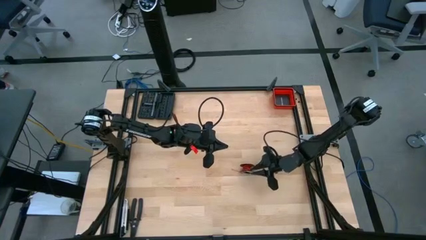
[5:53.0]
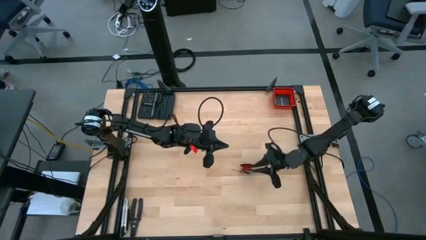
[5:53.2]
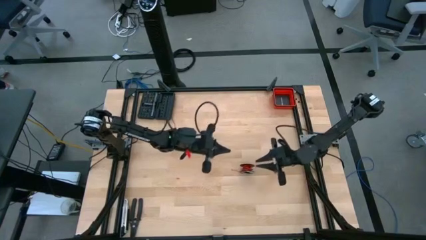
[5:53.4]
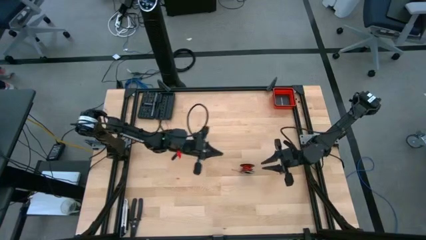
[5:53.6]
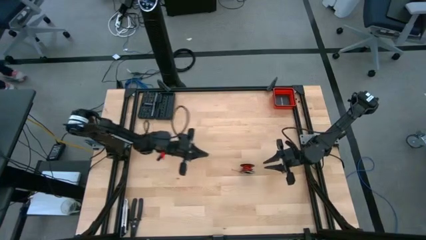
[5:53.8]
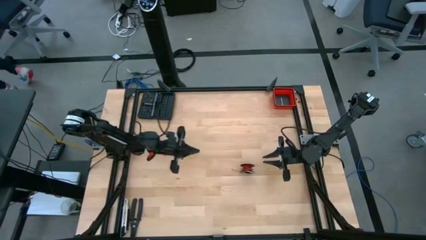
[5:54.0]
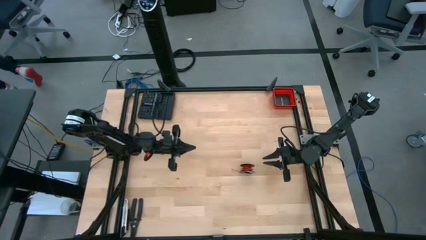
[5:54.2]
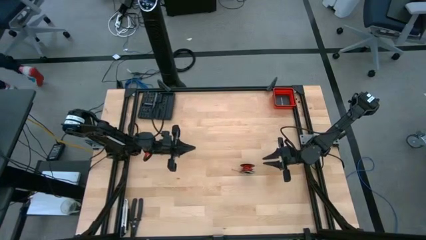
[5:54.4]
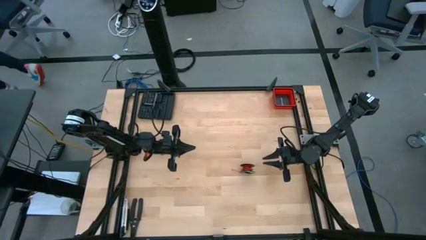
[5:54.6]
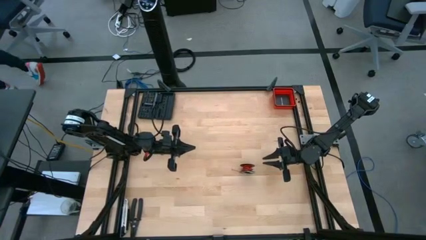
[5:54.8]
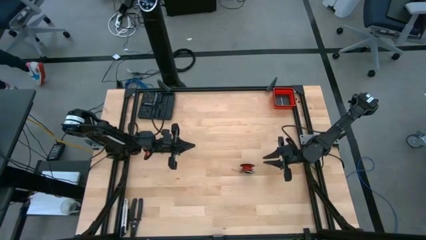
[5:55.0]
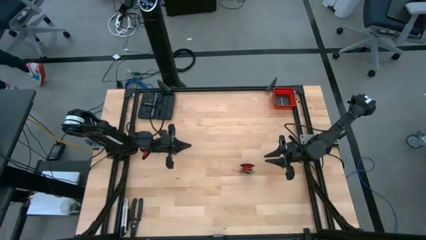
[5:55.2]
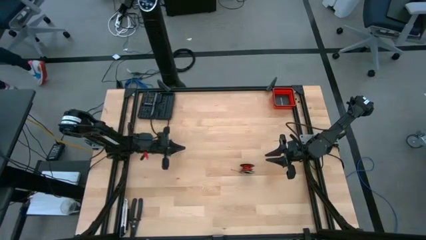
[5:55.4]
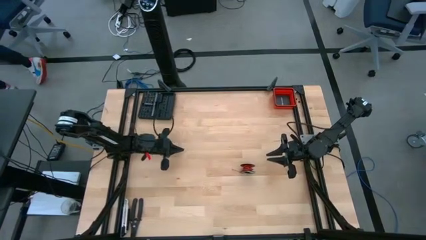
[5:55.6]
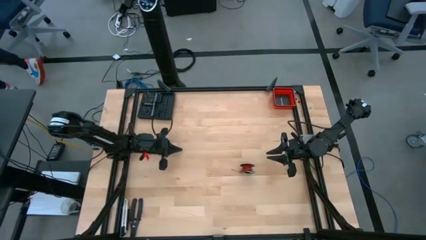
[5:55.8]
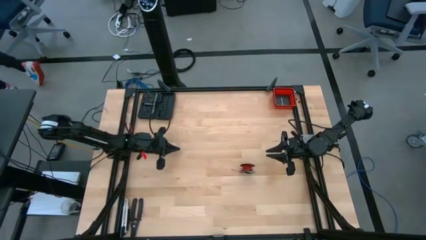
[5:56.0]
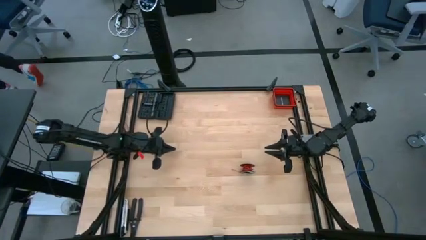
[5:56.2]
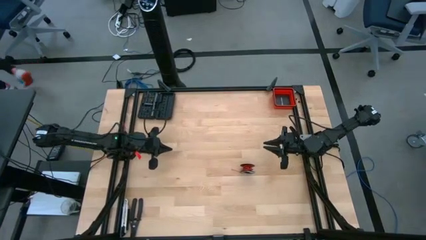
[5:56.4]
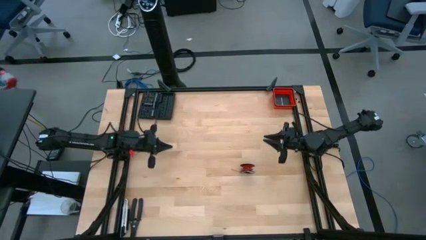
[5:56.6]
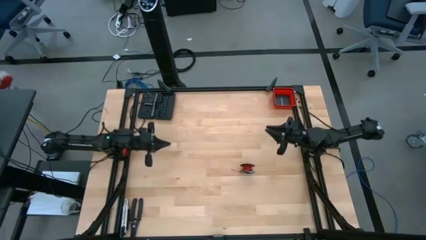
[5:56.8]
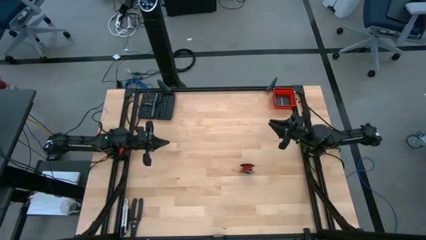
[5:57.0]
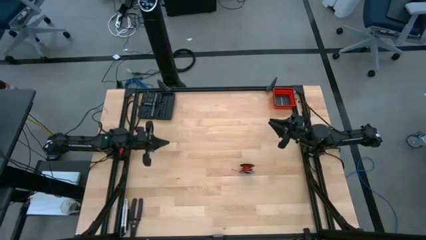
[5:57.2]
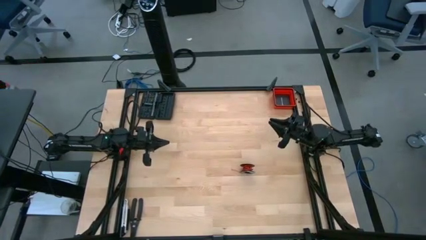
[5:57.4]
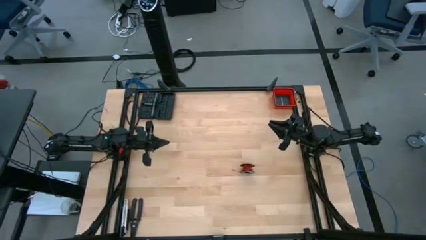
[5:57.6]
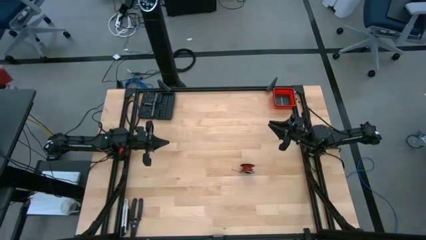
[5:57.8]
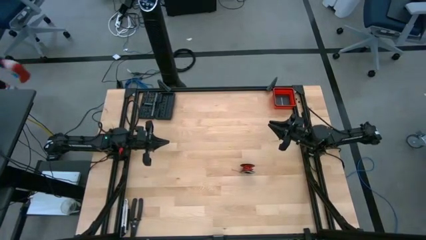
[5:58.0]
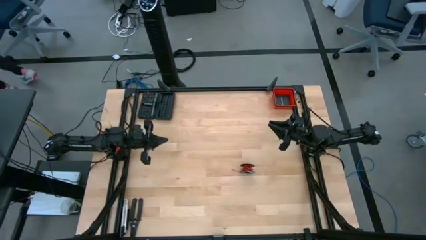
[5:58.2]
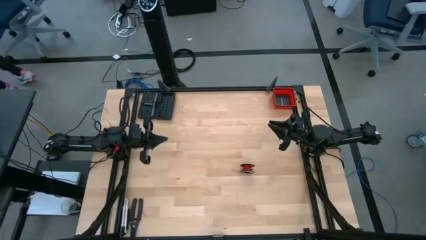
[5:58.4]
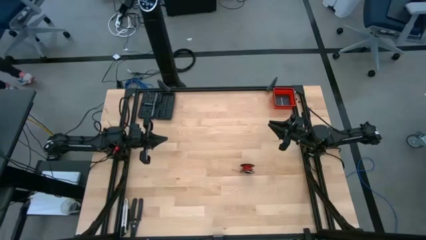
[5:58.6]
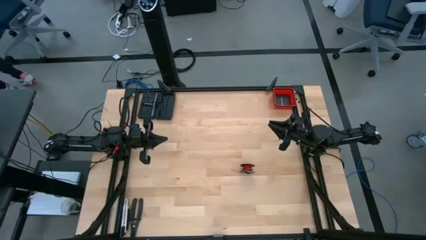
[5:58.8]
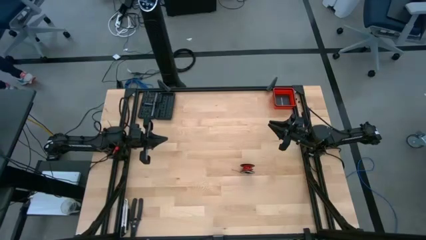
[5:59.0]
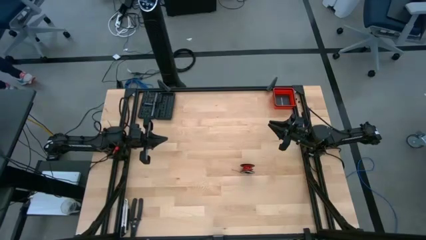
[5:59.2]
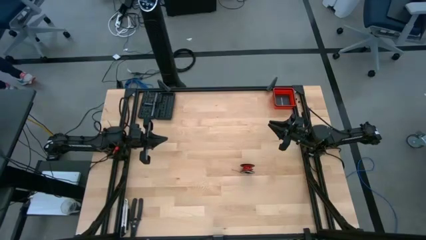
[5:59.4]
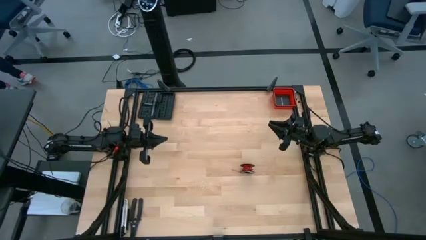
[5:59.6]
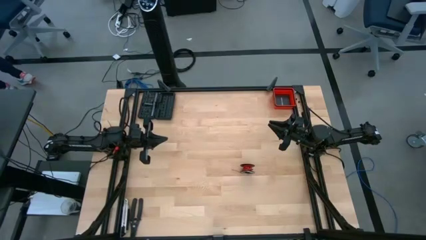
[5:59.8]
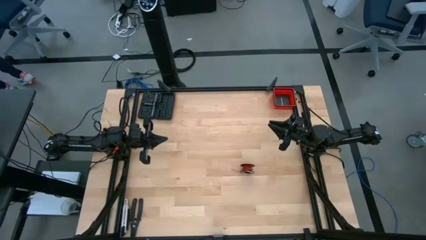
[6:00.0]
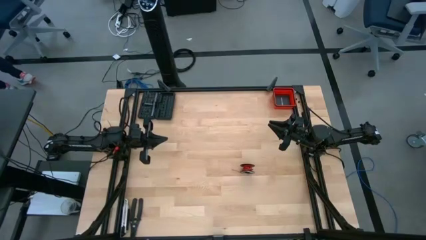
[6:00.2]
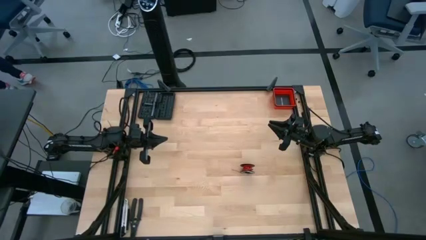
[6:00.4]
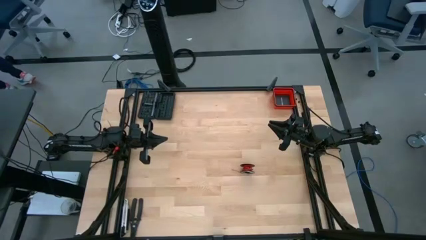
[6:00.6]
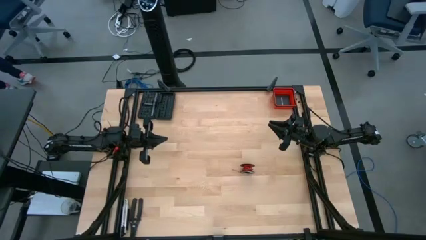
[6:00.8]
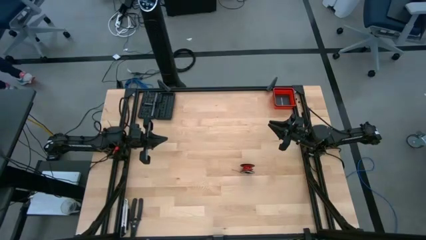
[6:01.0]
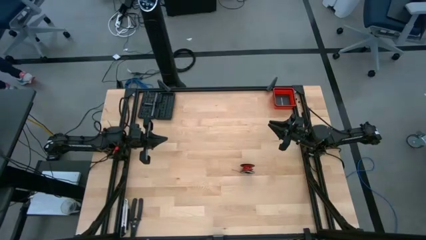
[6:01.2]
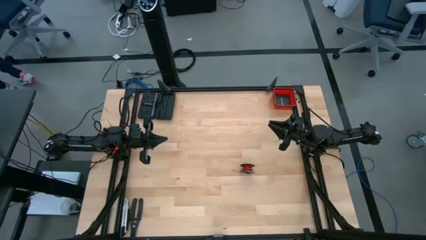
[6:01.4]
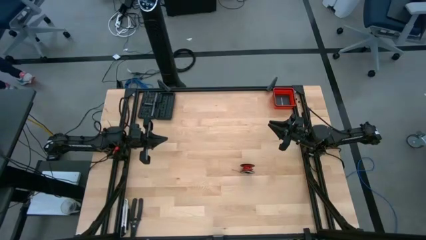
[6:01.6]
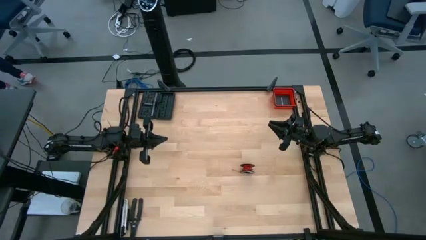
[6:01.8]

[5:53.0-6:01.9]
Task: Coil cords
Return to Home Position

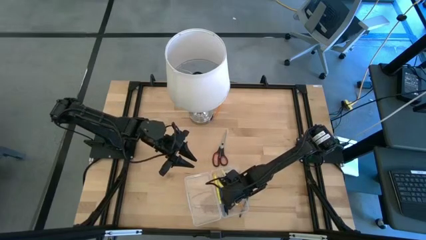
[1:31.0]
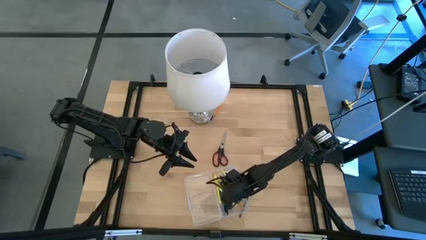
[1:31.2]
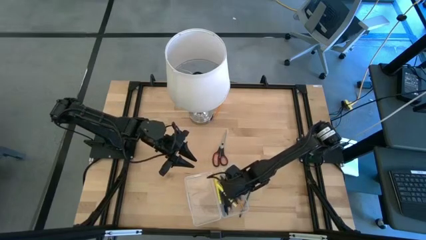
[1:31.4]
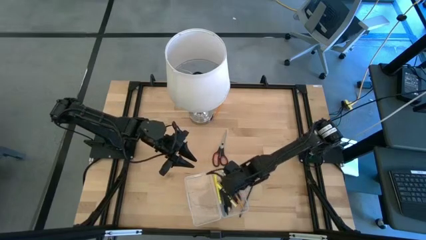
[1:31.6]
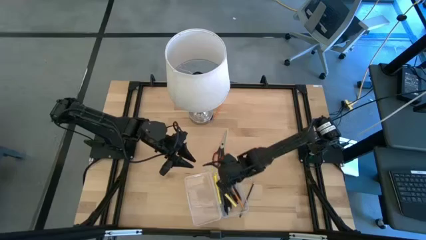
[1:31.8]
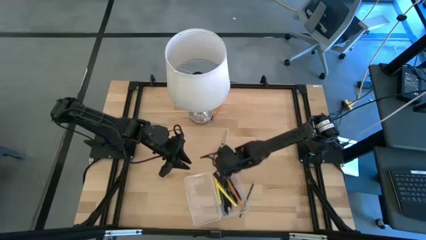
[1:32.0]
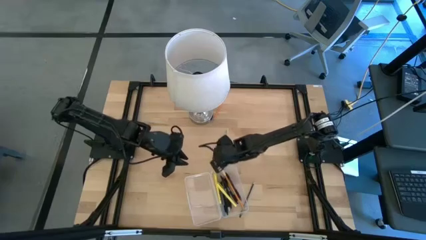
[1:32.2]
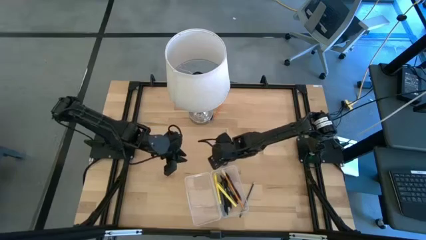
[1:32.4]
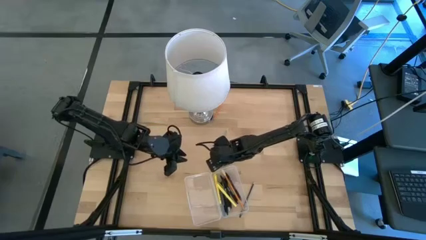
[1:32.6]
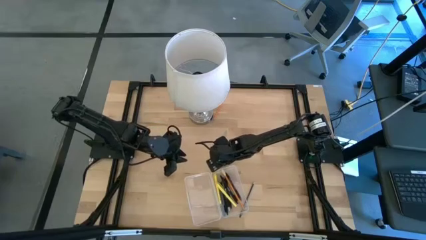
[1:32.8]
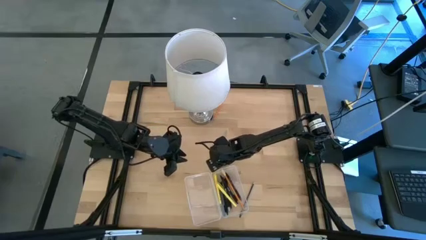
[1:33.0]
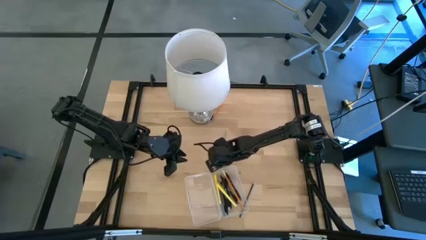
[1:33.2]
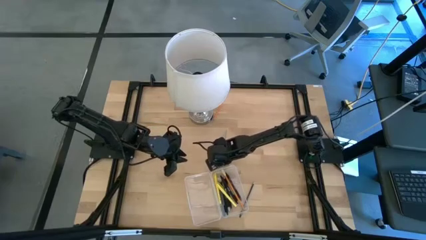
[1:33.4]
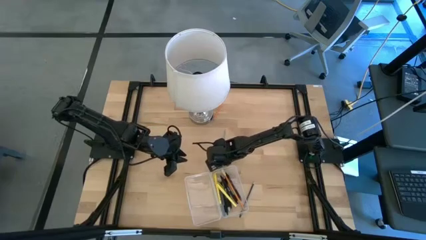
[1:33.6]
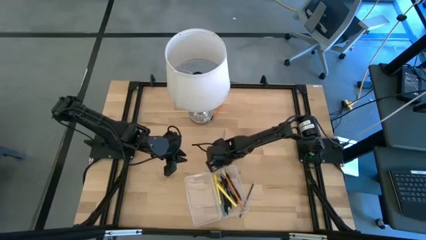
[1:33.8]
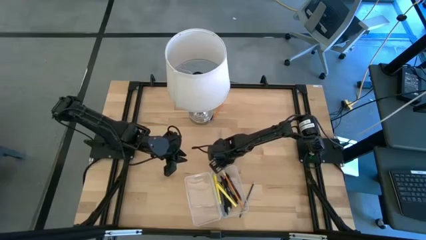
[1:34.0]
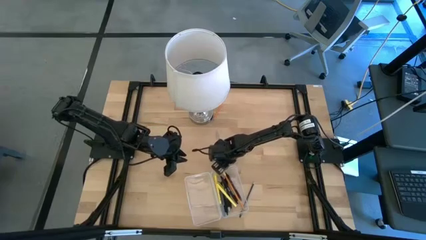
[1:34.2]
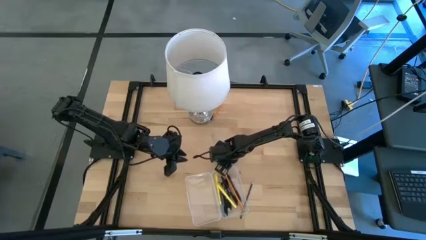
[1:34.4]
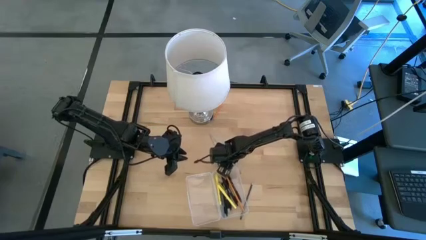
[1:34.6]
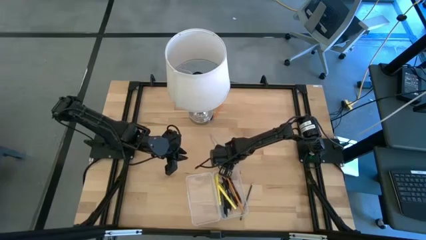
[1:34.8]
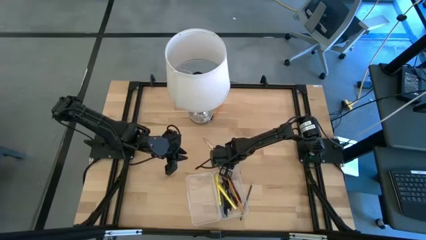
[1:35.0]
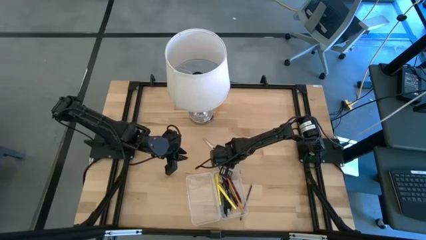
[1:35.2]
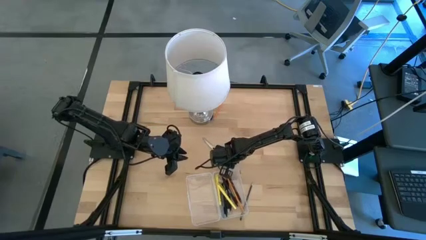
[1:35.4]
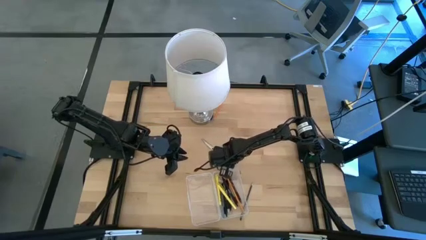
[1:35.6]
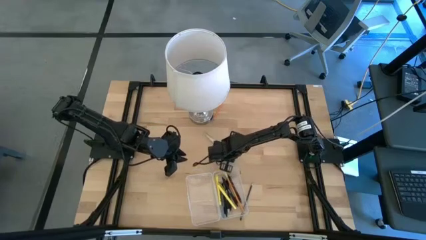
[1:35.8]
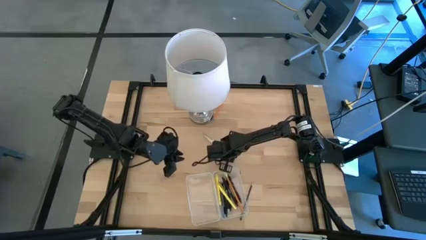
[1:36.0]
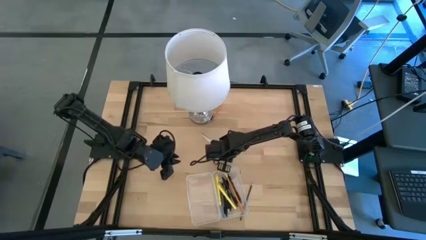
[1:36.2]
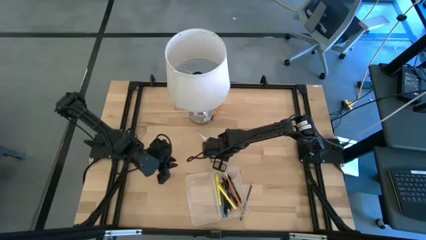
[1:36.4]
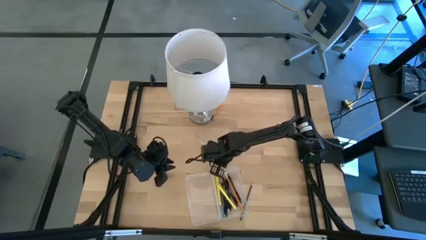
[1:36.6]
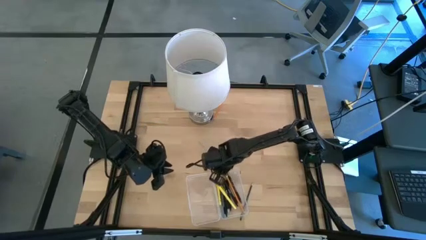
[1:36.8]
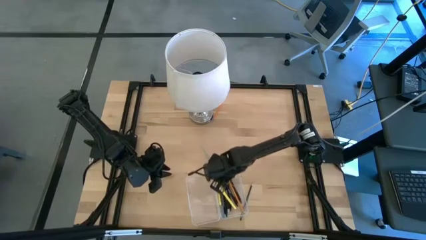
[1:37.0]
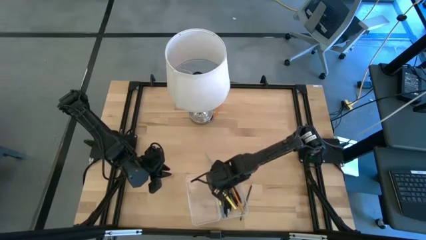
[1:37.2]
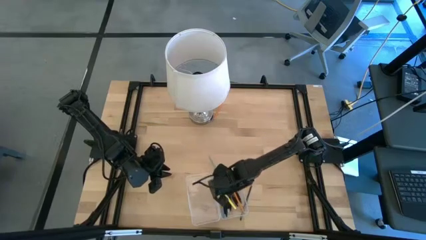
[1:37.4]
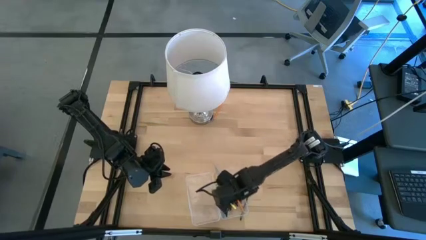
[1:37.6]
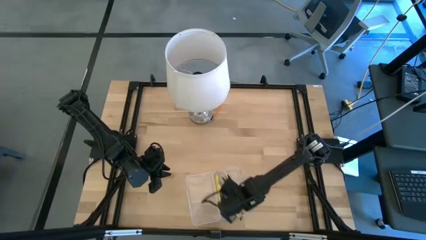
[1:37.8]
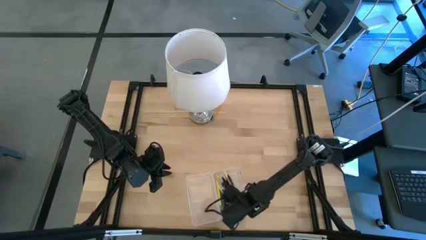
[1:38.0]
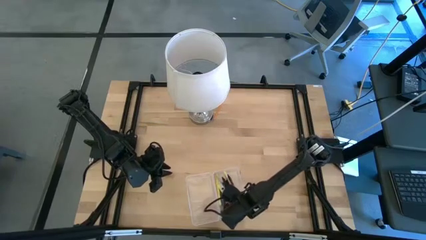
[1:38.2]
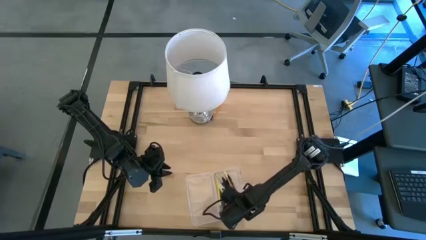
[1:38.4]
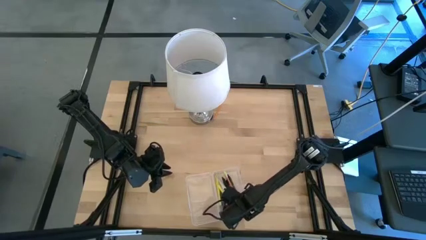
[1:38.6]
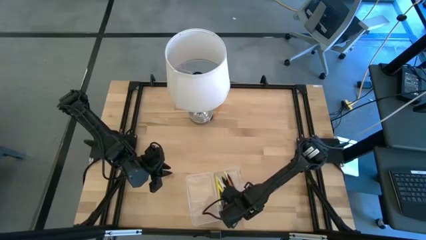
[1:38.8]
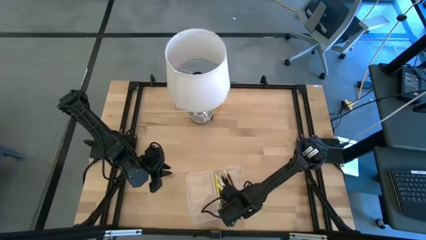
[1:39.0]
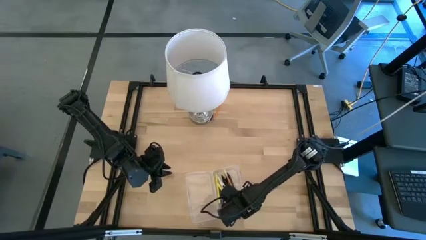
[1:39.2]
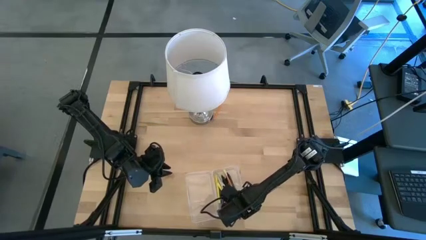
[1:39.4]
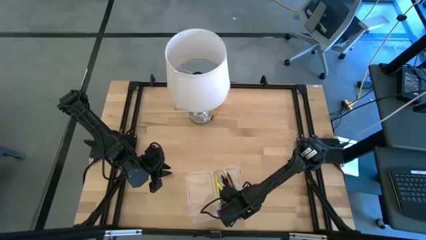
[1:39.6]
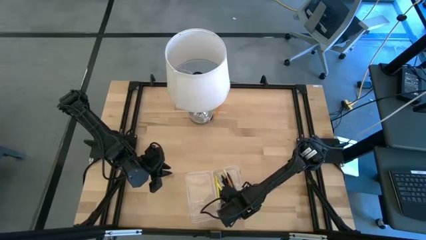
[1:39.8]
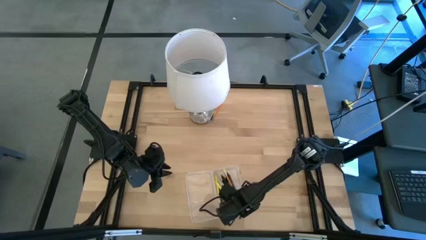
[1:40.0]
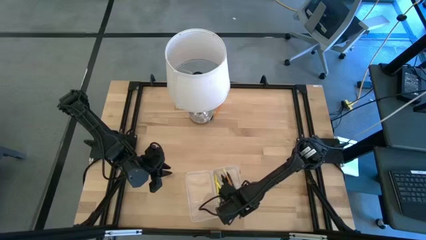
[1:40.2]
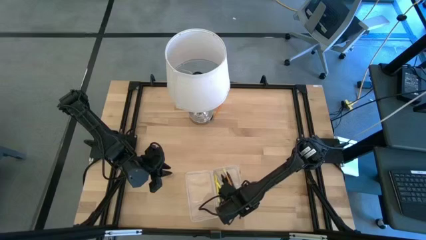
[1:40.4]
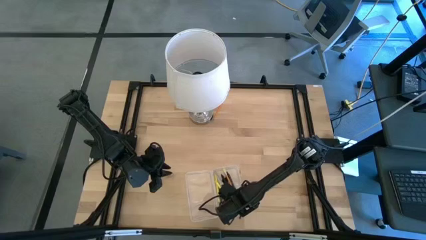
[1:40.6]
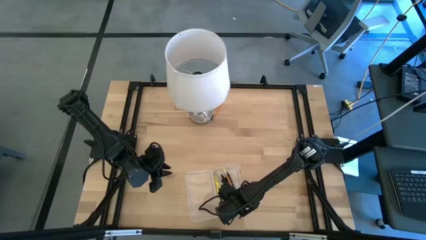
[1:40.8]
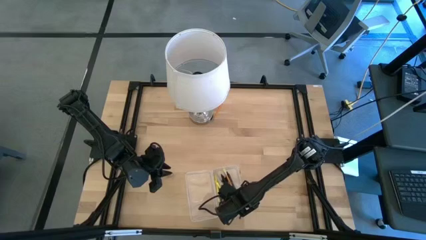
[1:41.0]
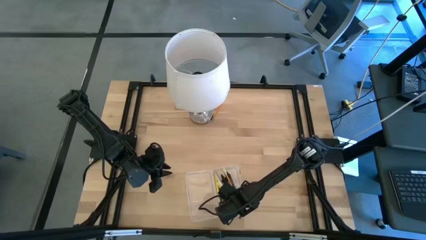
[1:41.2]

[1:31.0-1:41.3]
Task: Pick & place school supplies into a supply box
Put the black scissors into the transparent supply box
